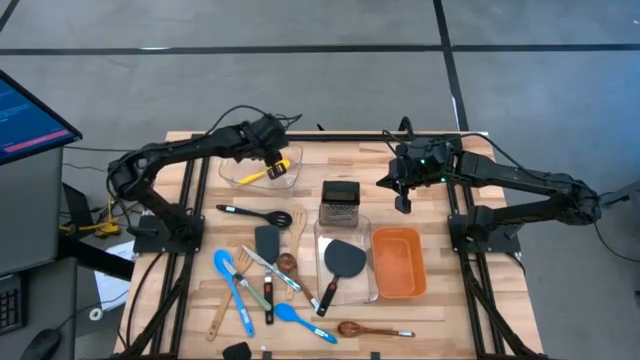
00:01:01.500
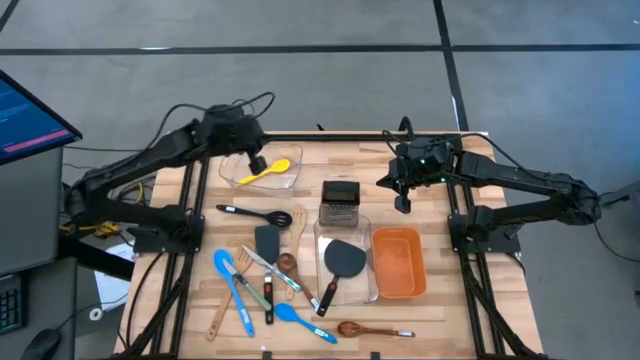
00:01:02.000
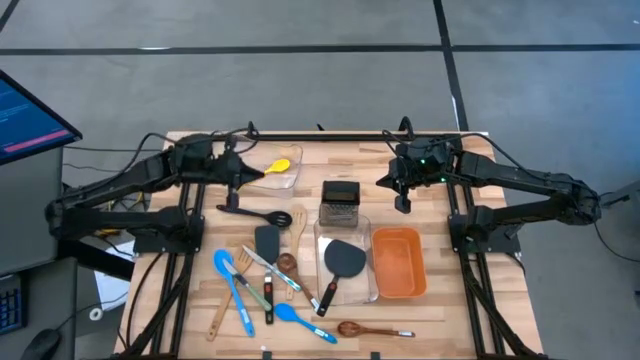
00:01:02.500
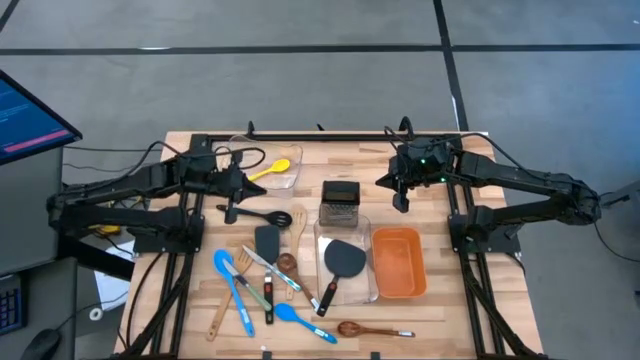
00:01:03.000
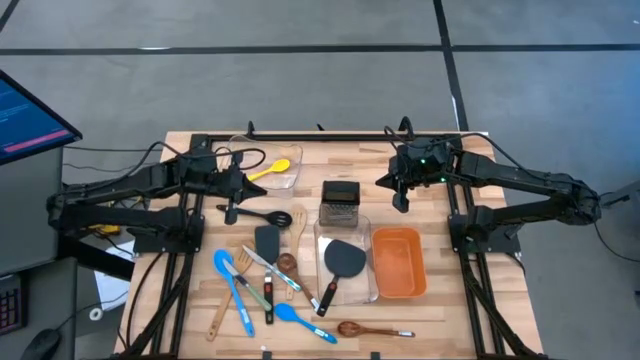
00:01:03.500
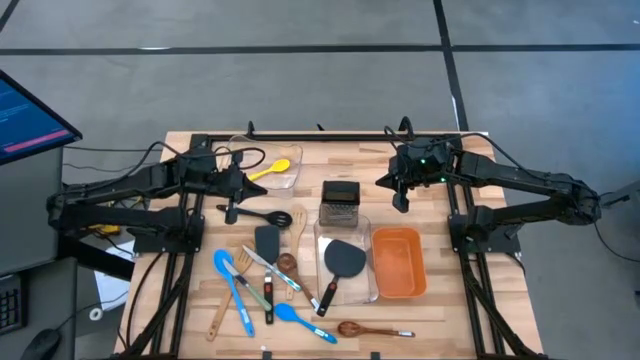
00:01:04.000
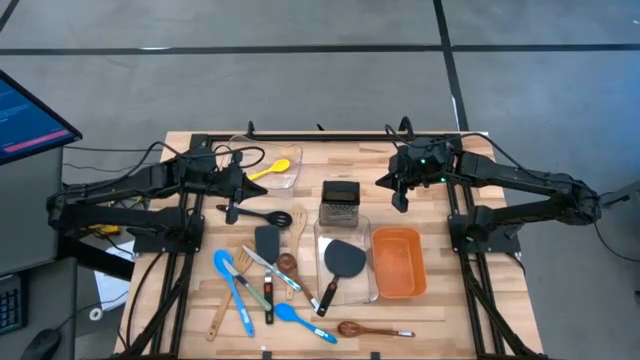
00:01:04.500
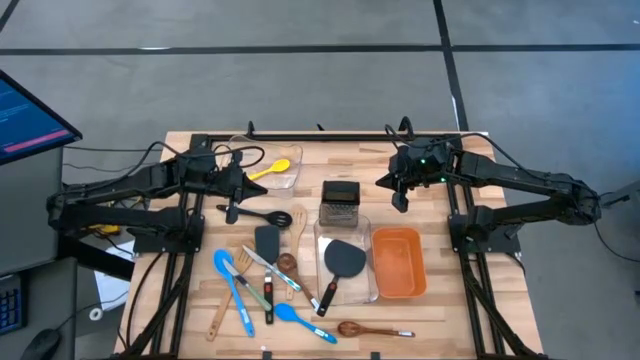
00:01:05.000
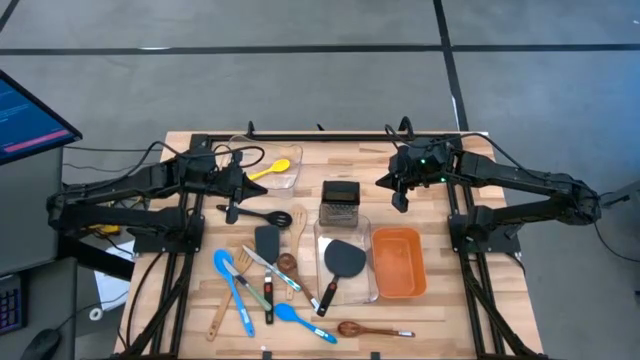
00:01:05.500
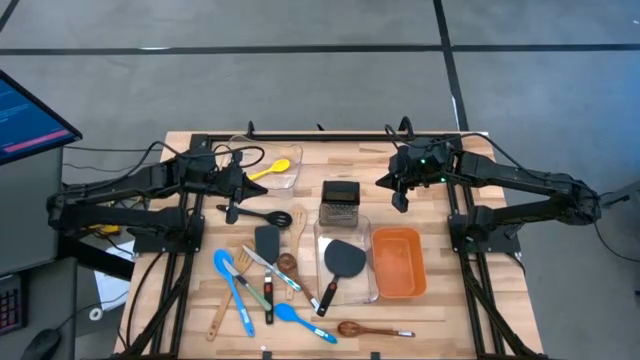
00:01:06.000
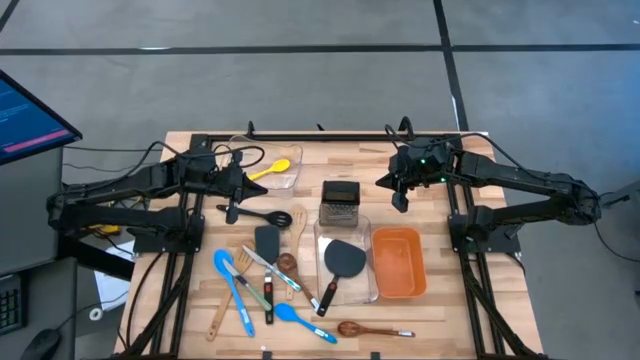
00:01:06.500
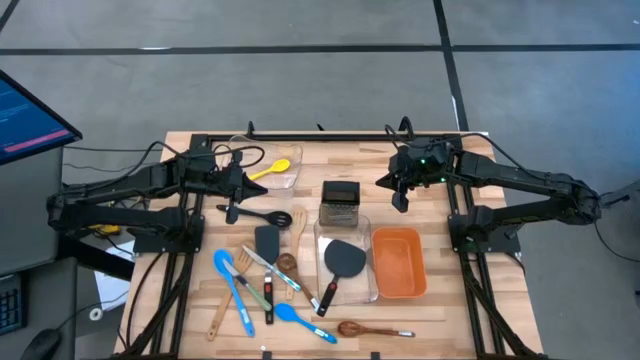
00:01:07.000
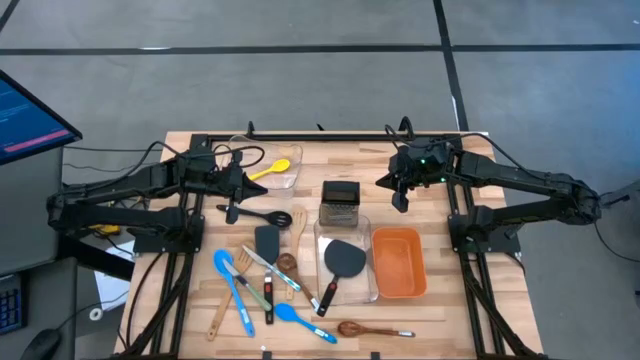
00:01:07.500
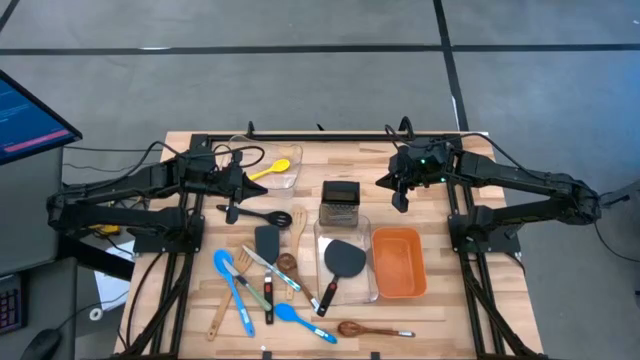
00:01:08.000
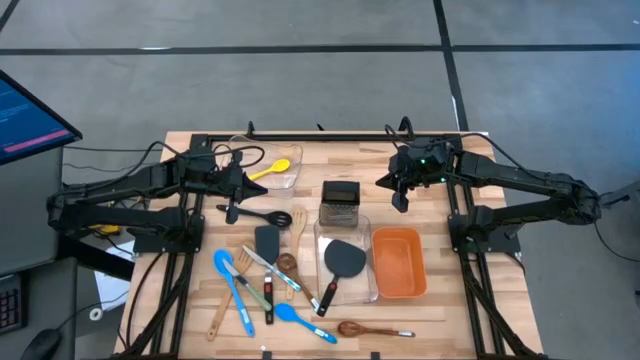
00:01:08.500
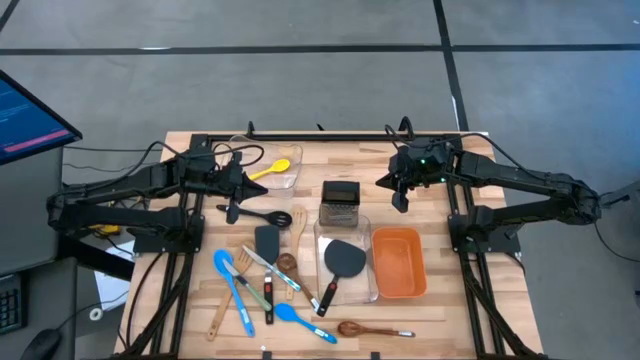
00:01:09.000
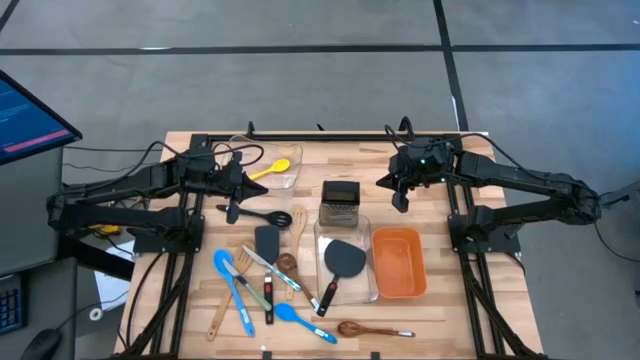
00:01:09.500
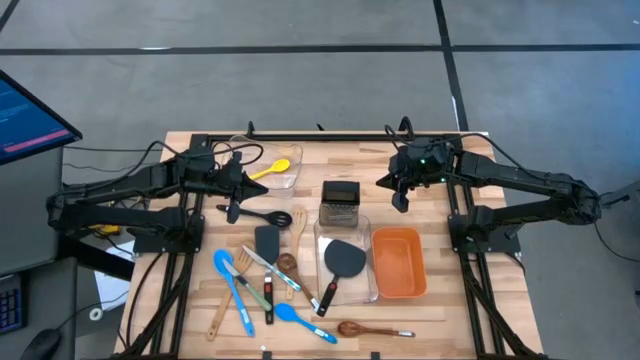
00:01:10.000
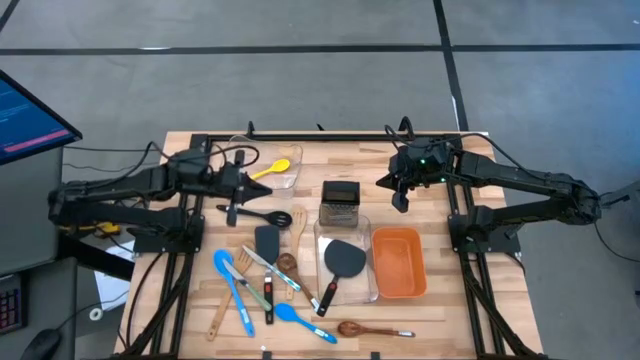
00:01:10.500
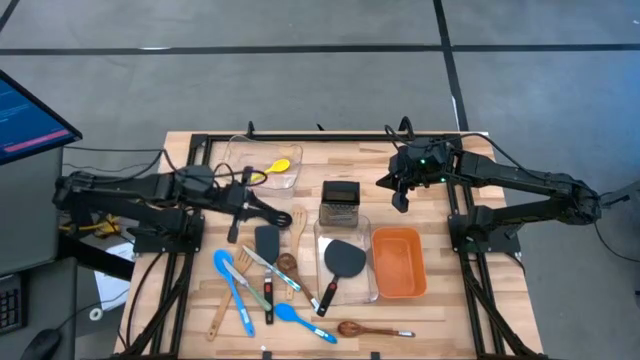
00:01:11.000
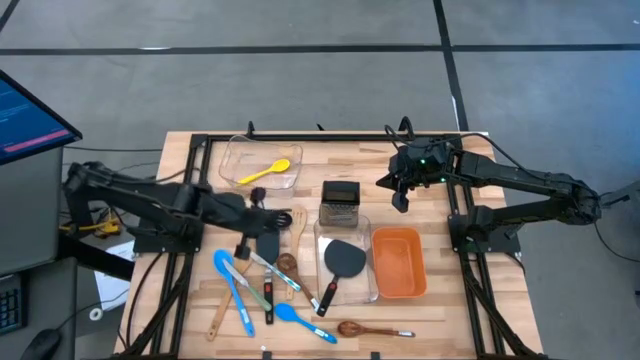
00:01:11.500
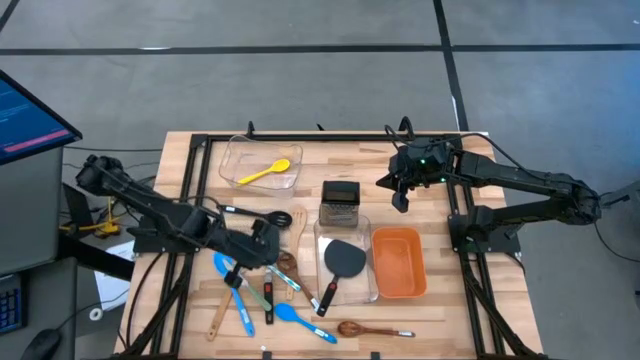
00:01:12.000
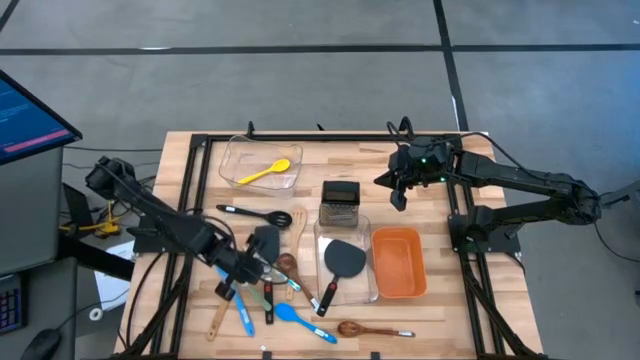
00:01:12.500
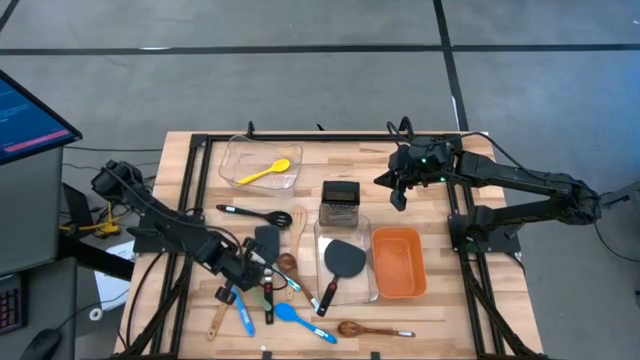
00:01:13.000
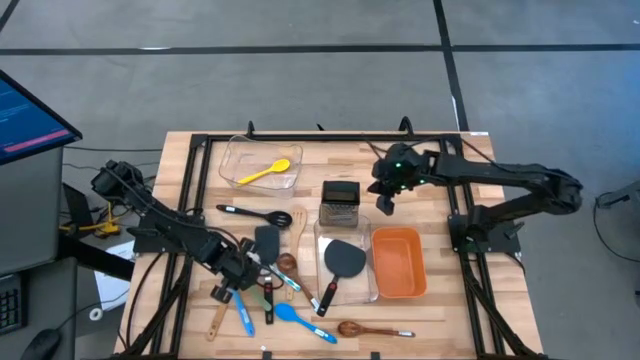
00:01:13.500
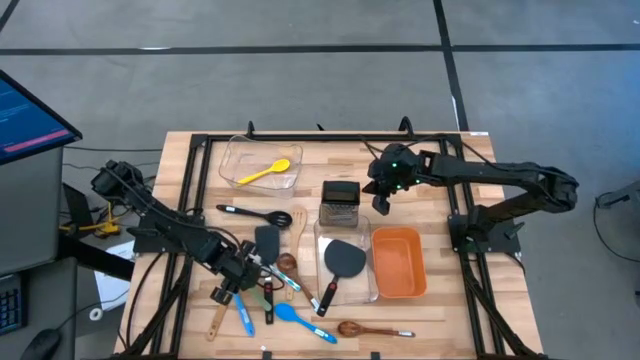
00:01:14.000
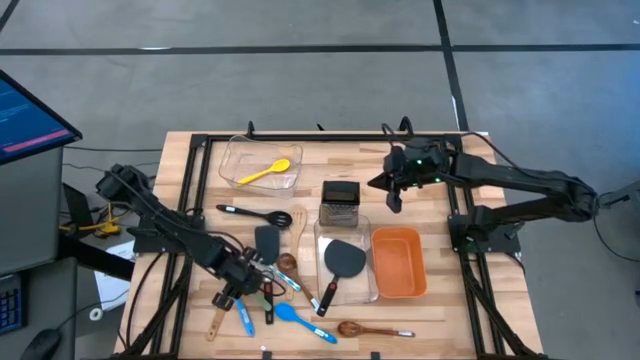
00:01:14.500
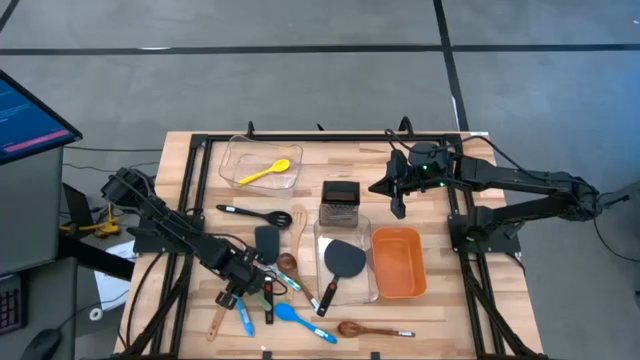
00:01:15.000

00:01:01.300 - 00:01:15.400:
Task: Pick & Place Kitchen Items
Put the green knife into the orange bin

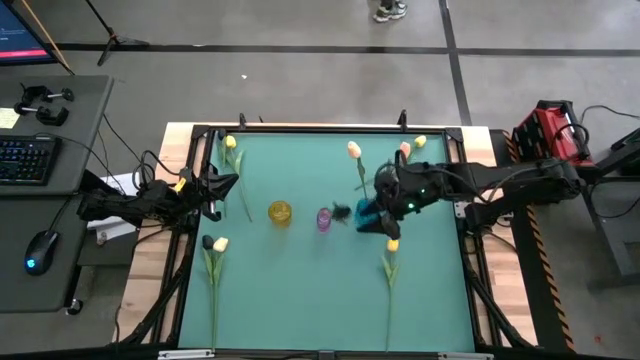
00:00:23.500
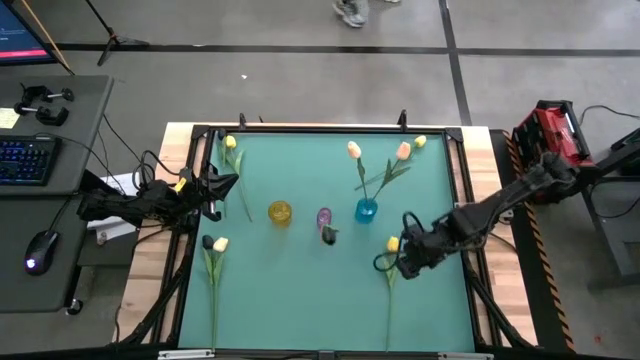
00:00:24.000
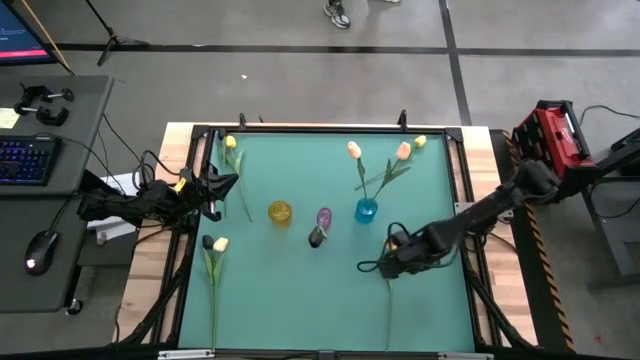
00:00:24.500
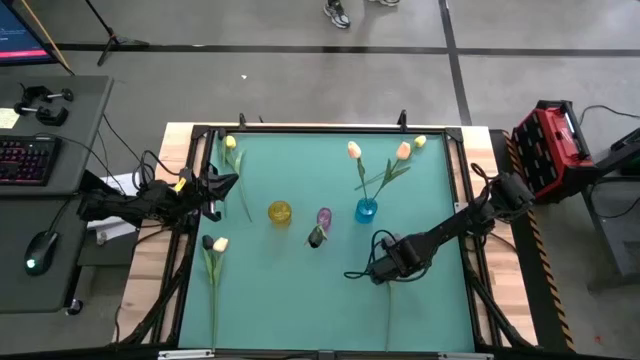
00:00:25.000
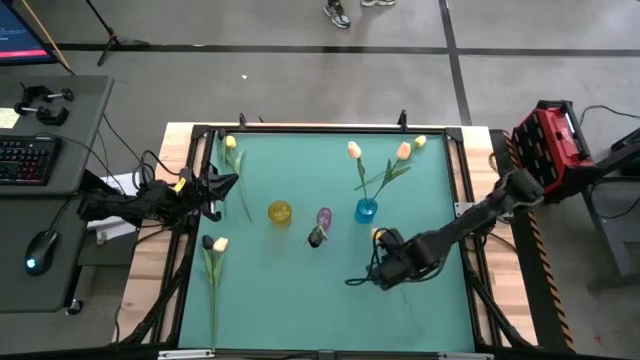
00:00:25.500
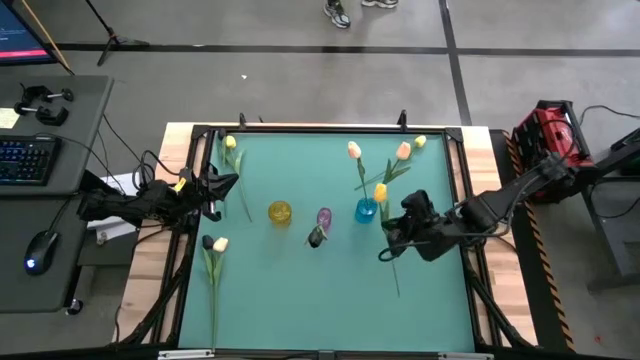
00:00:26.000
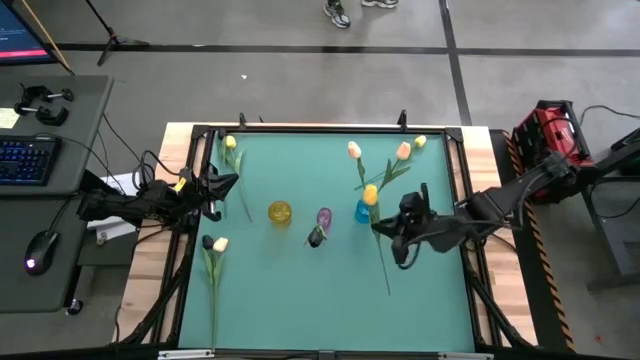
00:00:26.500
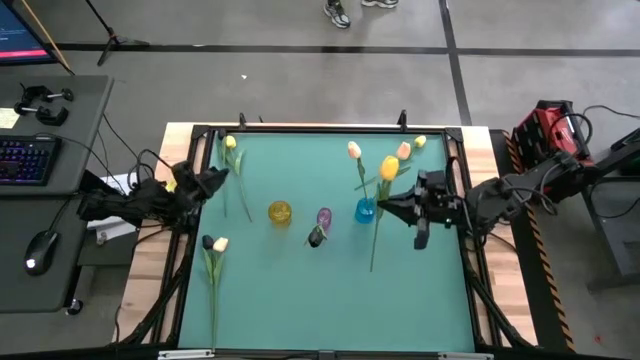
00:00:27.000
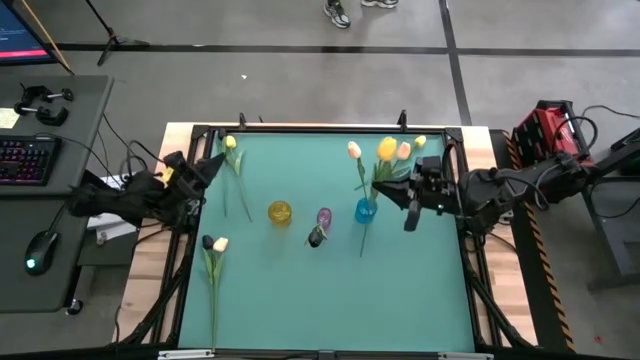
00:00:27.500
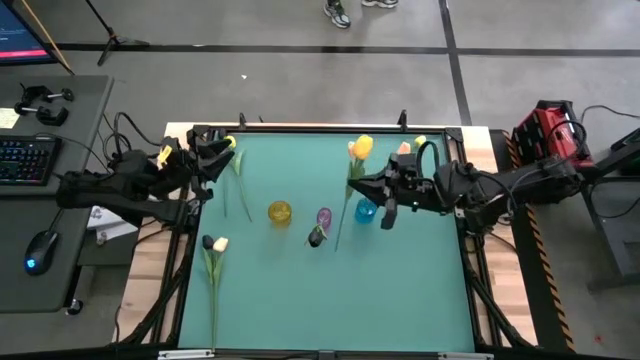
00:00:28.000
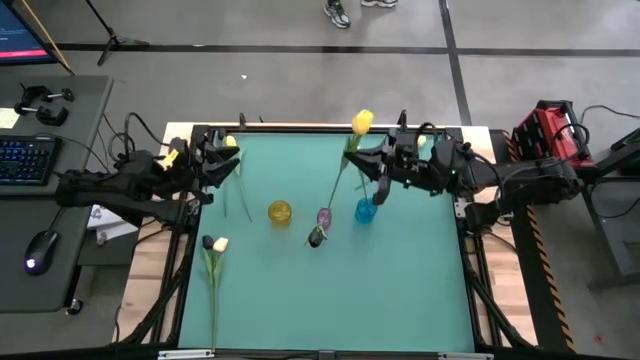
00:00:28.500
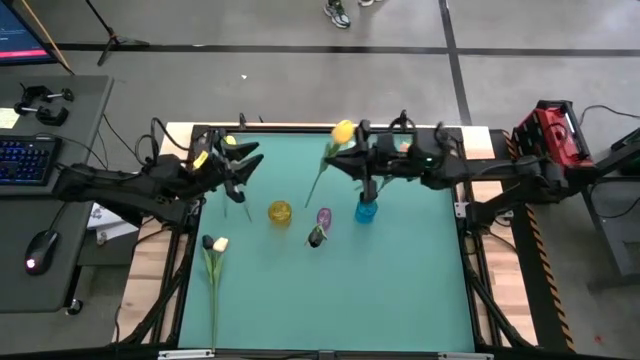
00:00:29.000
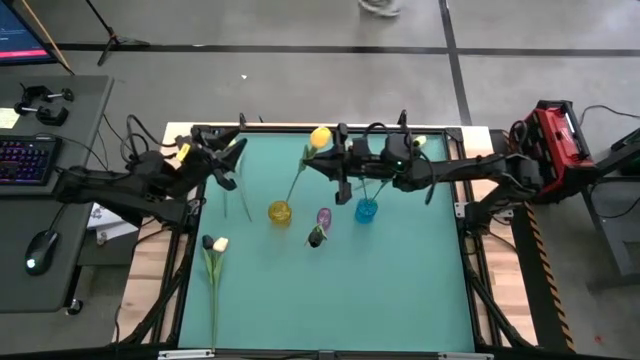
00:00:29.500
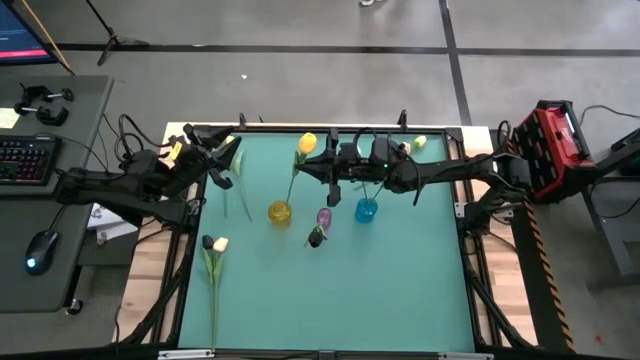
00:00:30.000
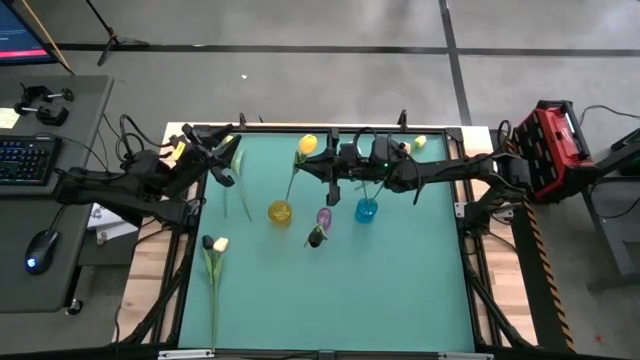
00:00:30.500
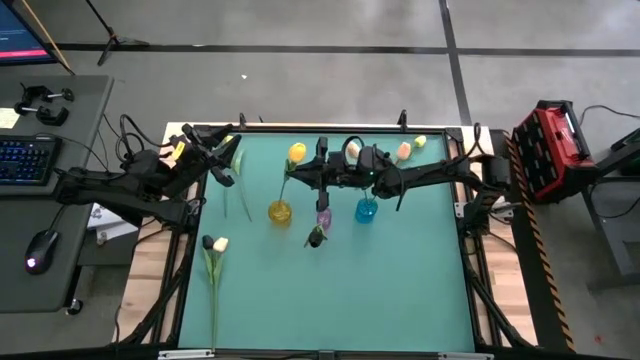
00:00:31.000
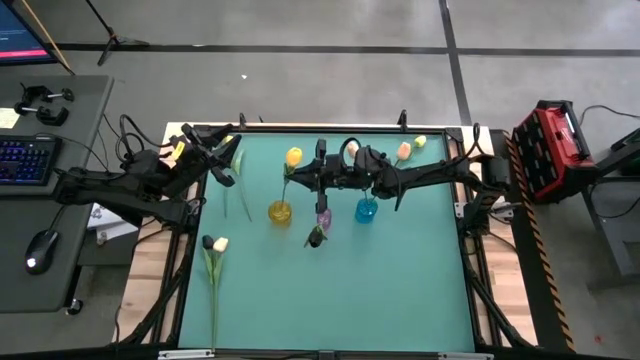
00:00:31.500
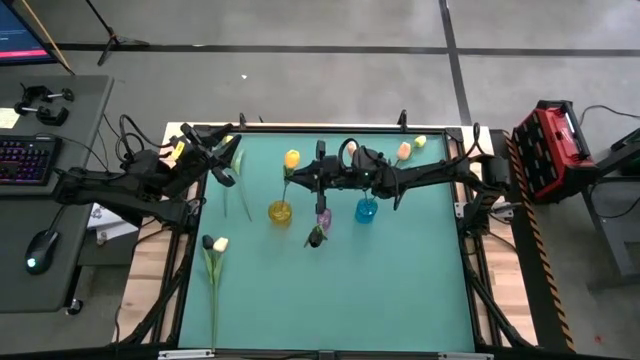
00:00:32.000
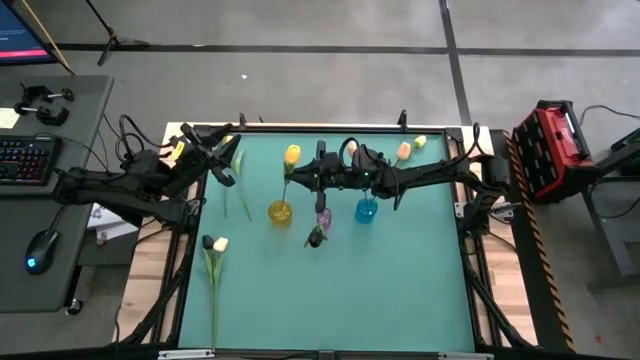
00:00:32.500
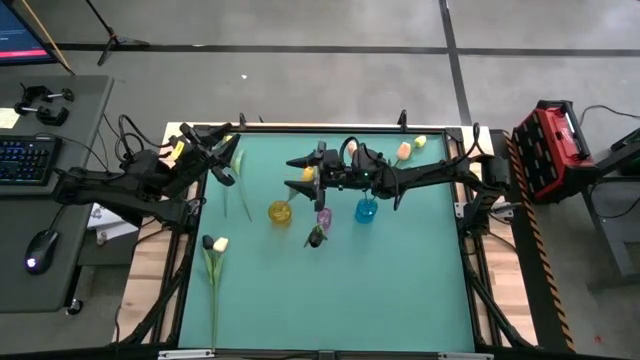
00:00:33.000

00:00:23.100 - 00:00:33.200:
Task: Sort flowers into vase by color
Put the bottom yellow tulip into the yellow flower vase
